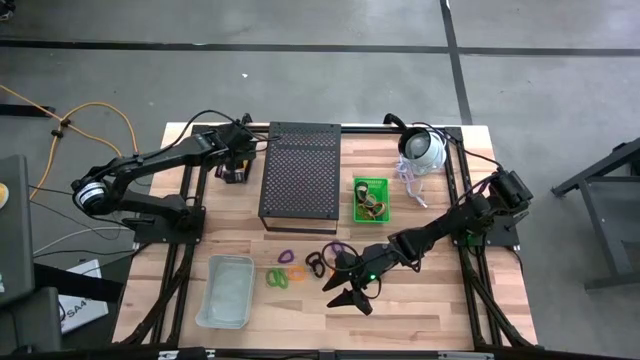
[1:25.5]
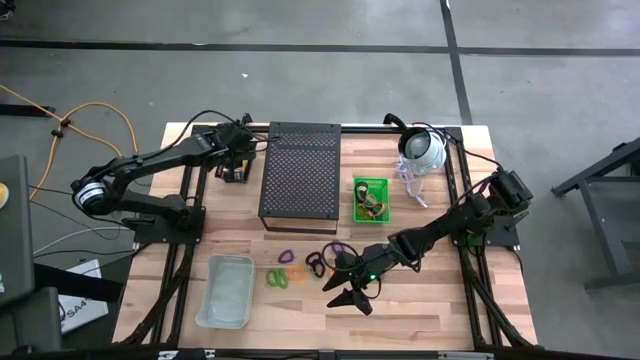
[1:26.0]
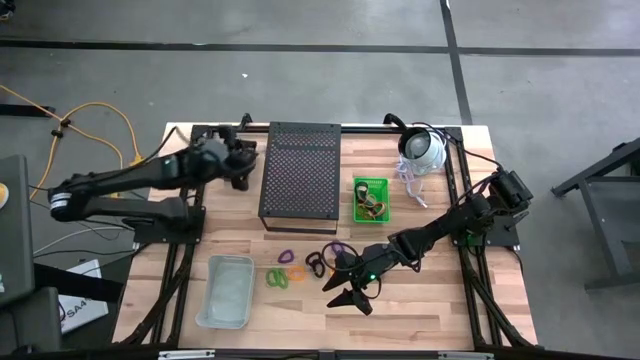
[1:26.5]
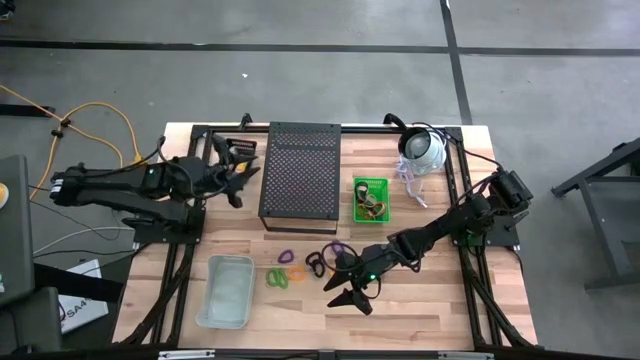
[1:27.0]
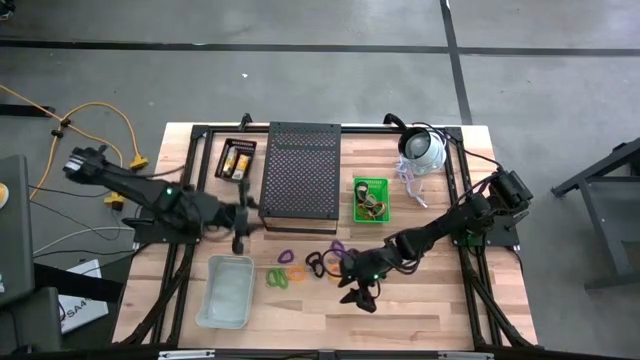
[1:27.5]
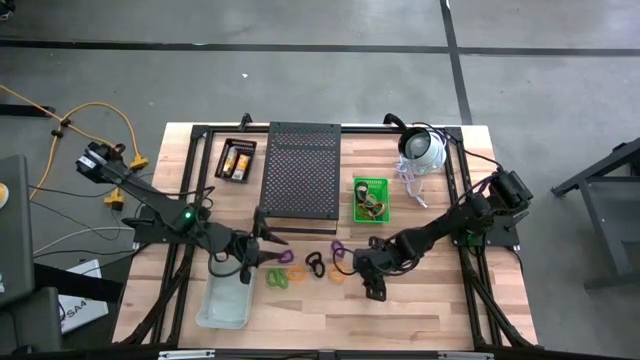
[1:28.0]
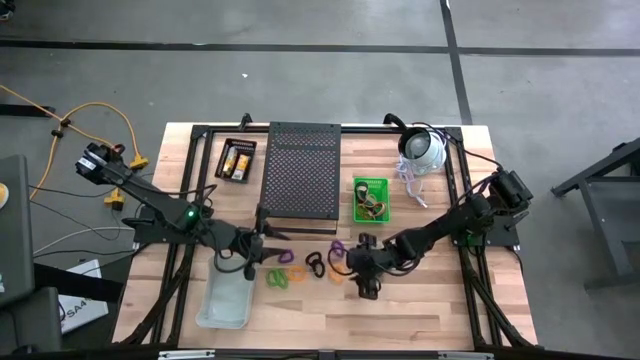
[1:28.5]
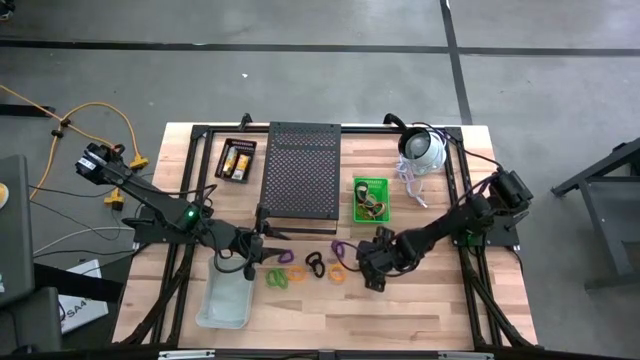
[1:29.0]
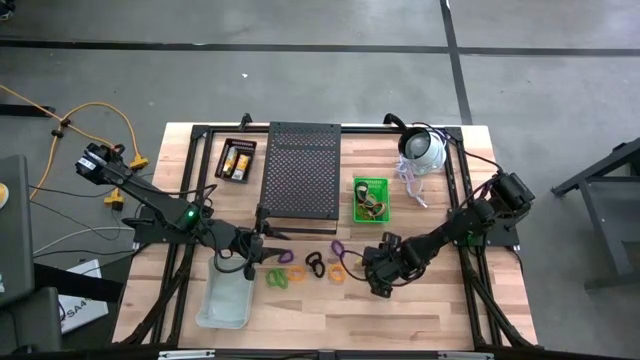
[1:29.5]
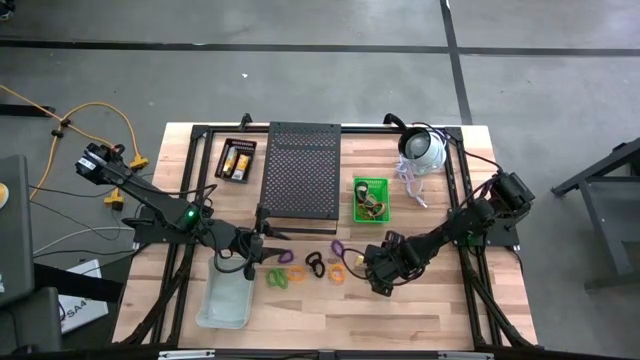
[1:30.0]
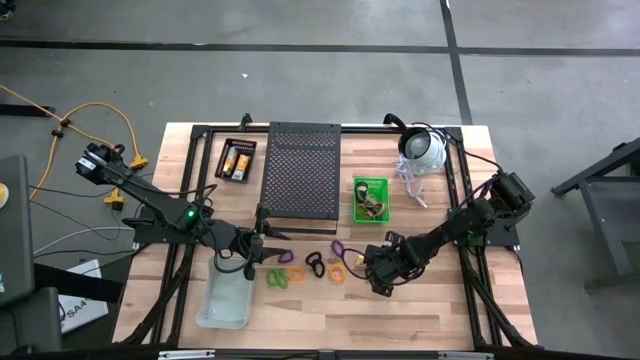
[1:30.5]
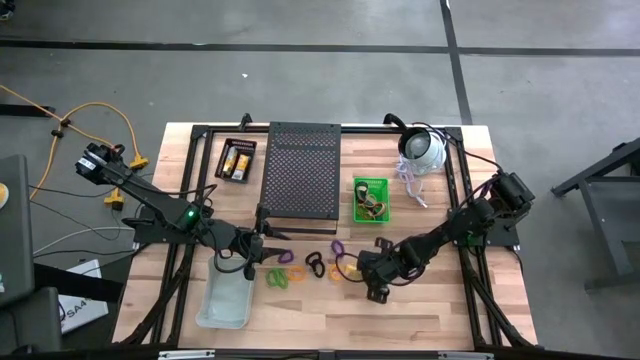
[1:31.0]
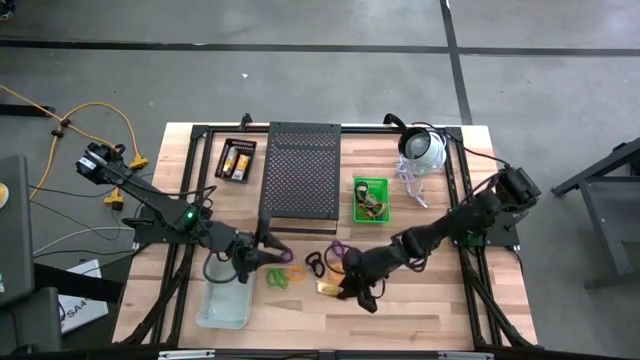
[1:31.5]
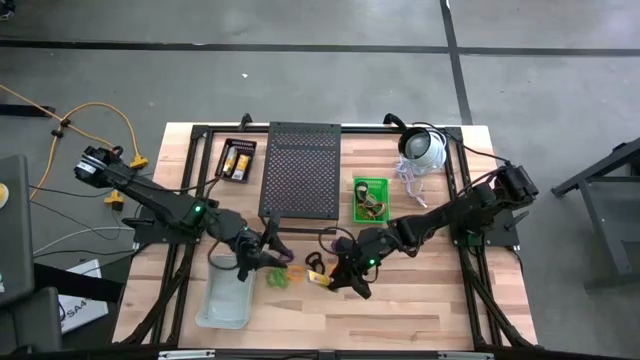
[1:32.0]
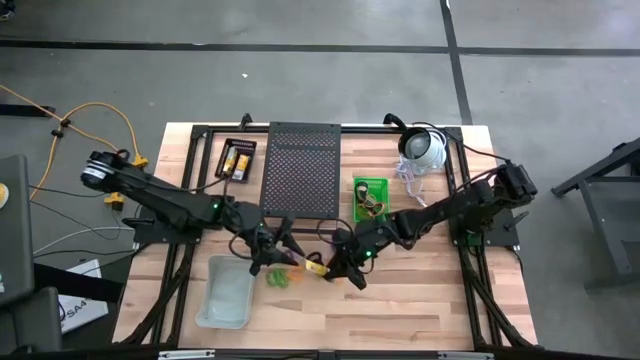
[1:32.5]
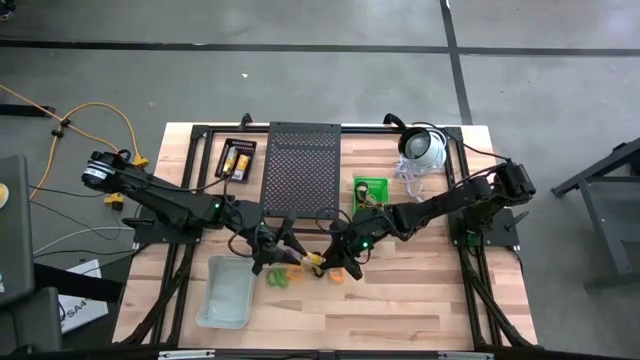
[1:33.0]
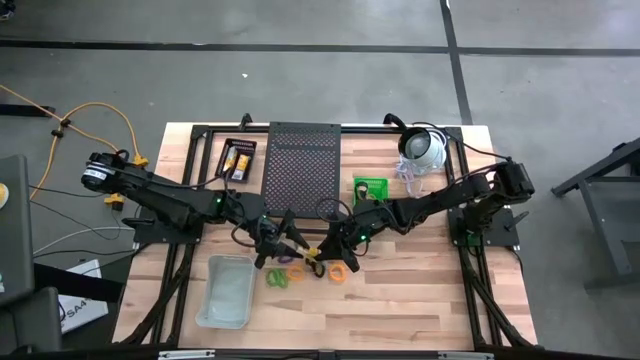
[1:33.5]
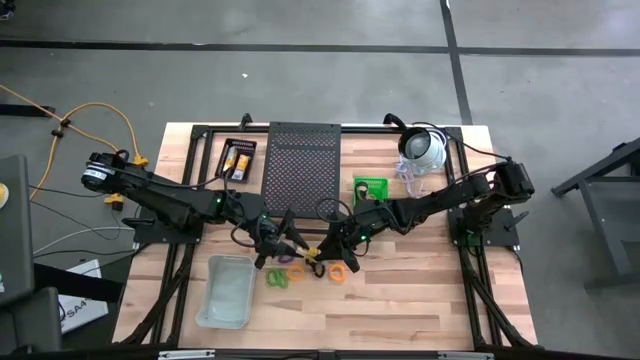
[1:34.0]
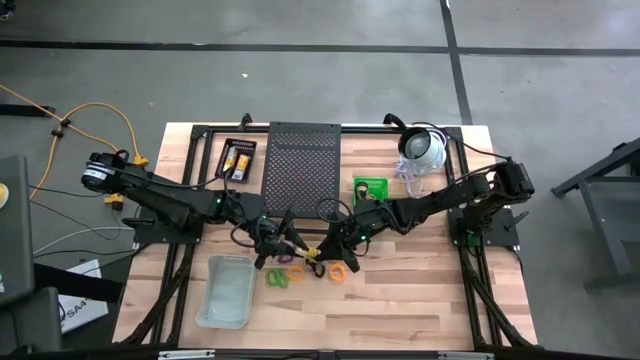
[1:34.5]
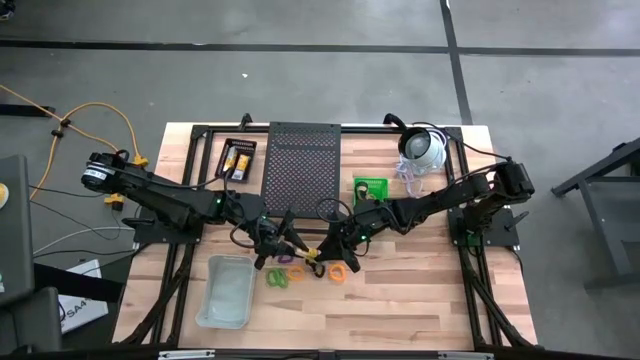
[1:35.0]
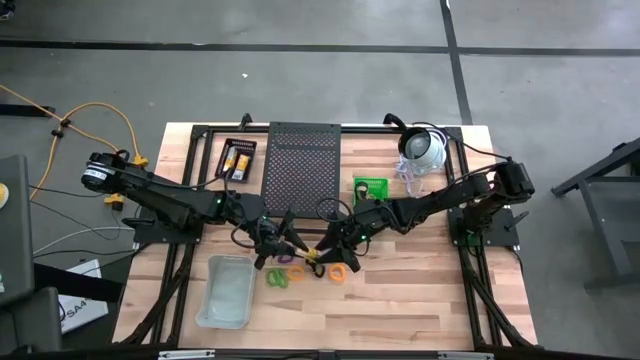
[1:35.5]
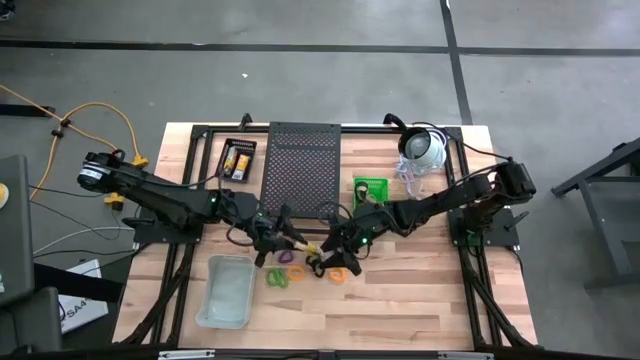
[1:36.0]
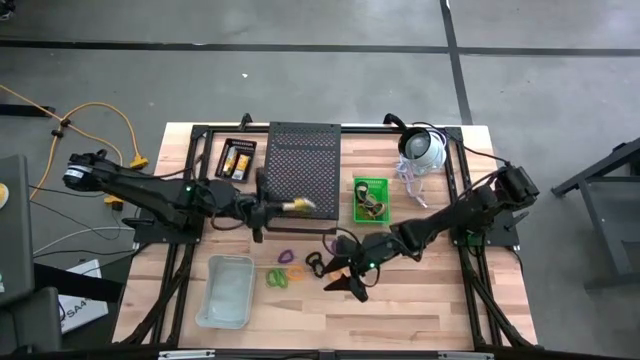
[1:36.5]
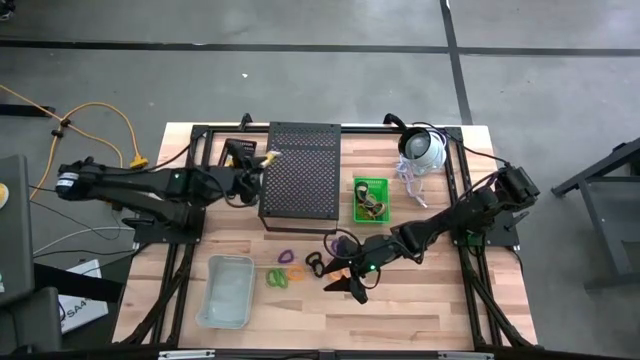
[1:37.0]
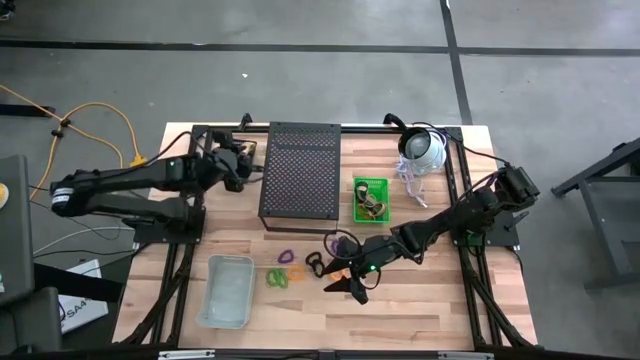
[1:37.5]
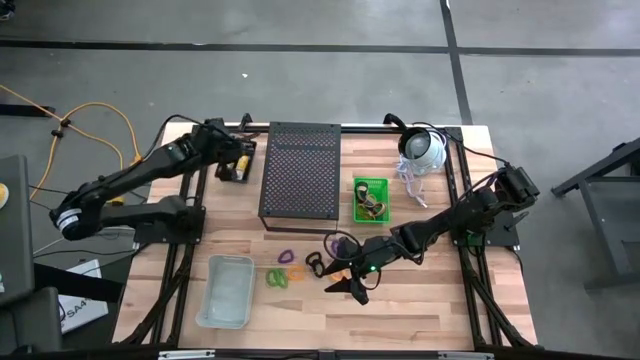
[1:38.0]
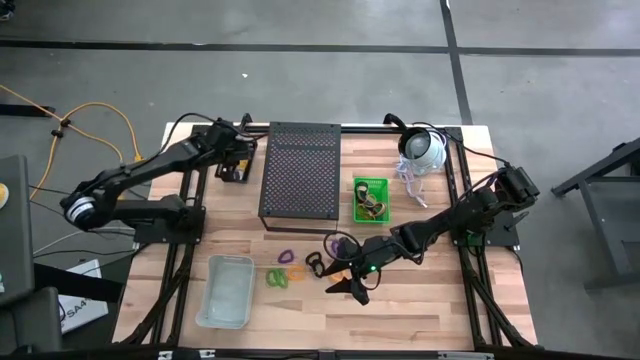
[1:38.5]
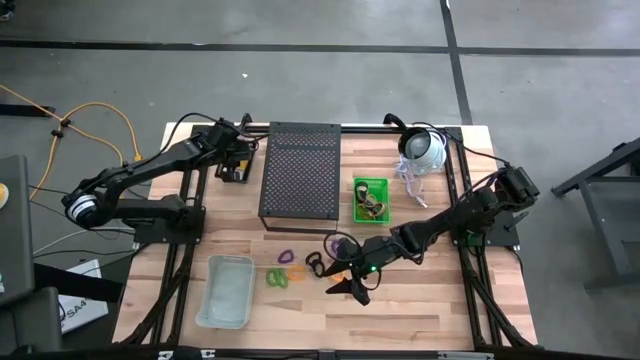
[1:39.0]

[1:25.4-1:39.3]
Task: Pick & Place Office Desk Supplies
Put the crayon box into the black basket

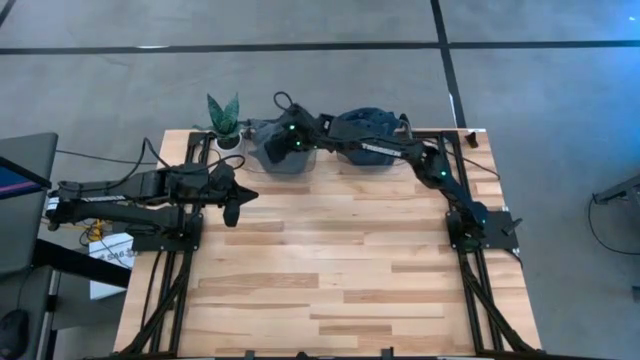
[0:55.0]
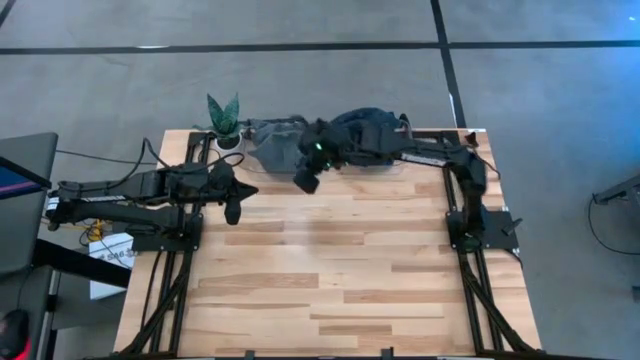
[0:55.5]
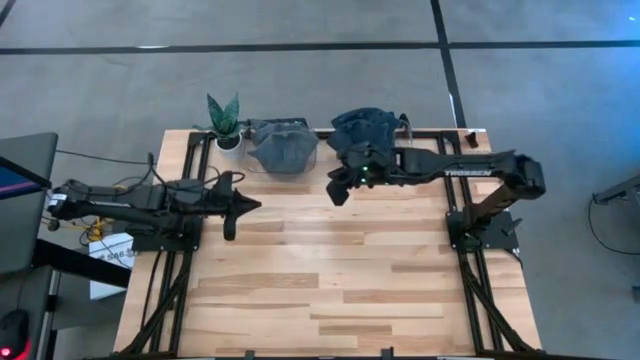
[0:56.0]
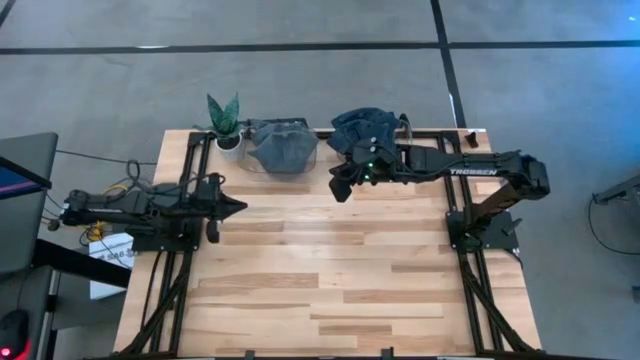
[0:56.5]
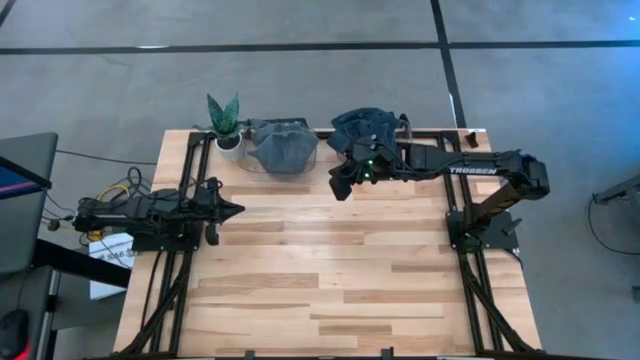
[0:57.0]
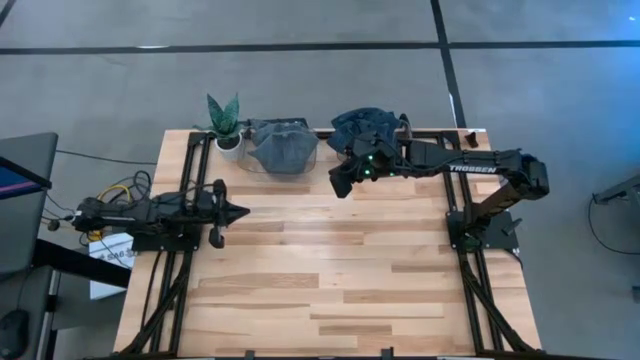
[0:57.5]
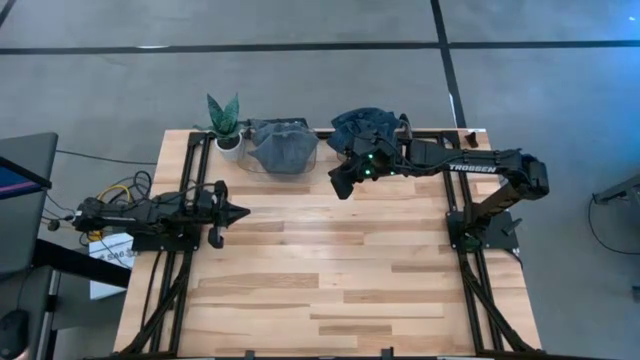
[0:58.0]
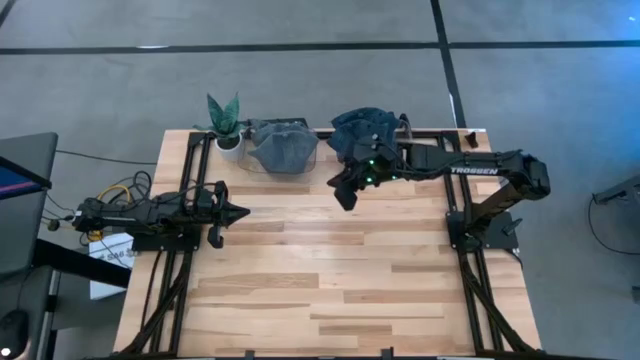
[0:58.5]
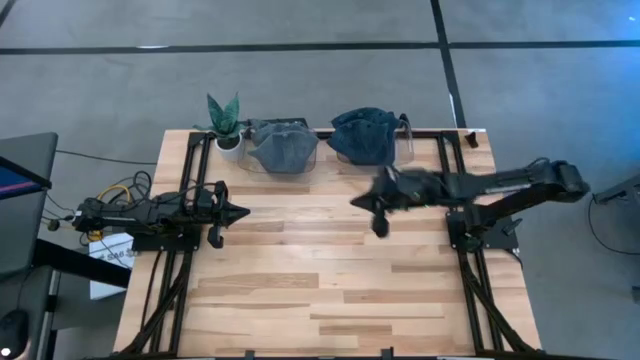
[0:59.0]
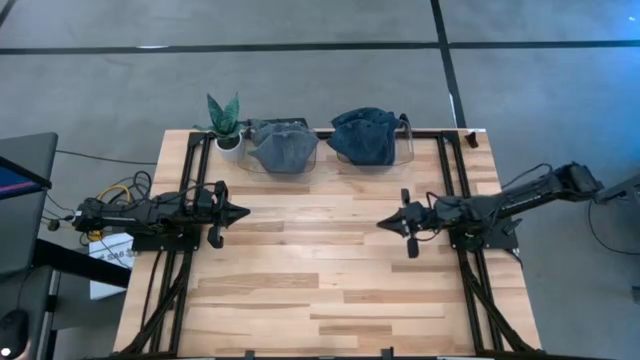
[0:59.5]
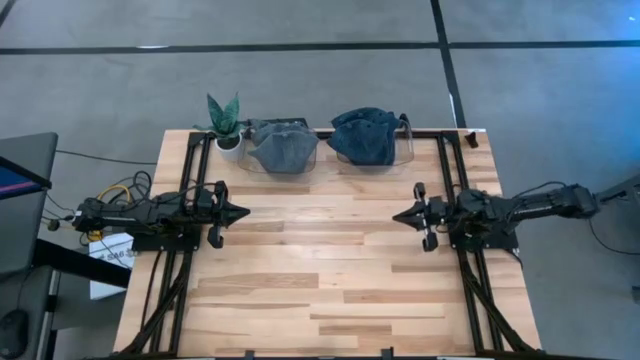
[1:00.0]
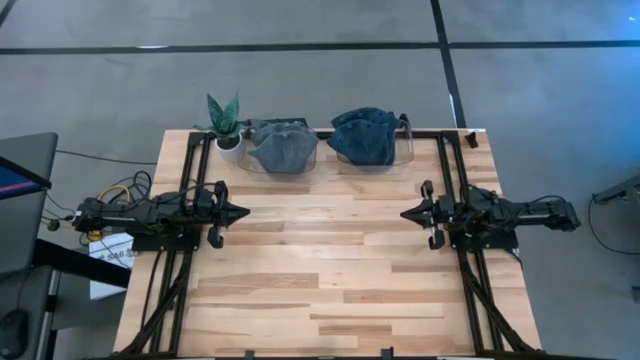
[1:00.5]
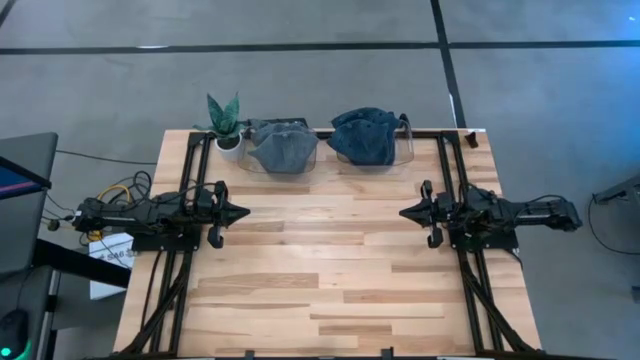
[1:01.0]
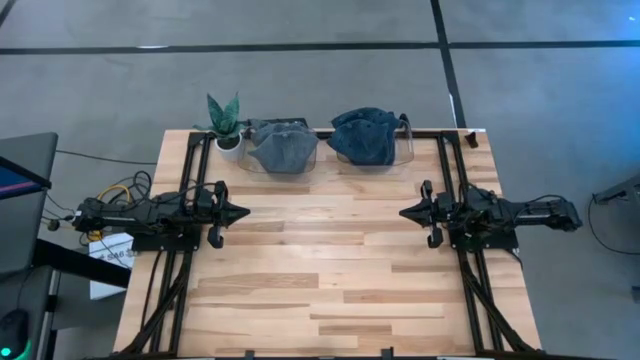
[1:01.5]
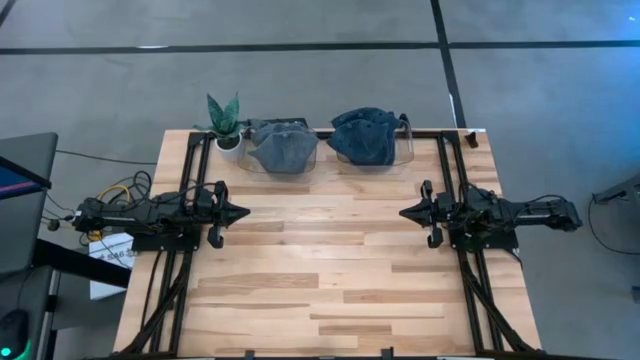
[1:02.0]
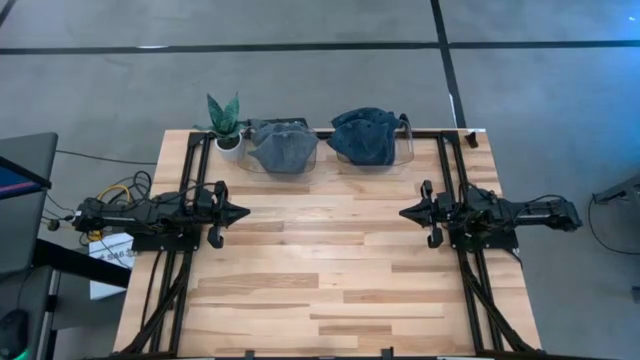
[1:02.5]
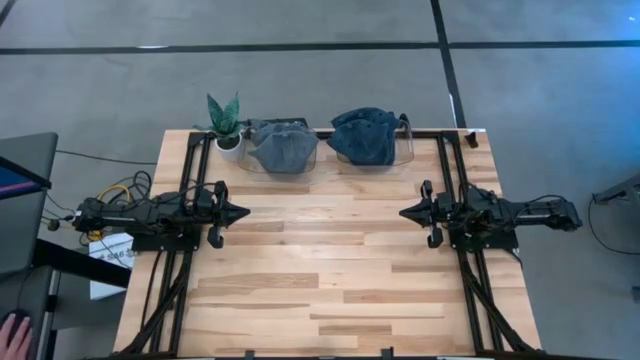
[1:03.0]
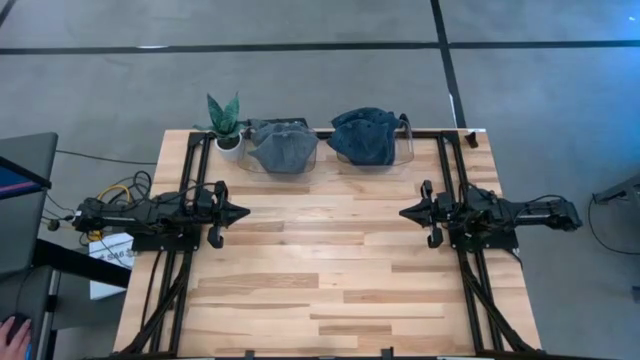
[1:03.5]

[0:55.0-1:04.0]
Task: Pick & Place hat
Return to Home Position
